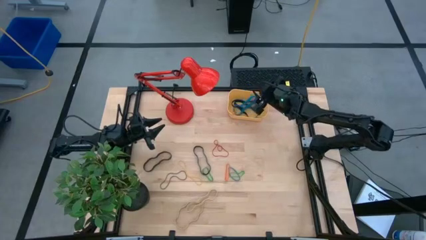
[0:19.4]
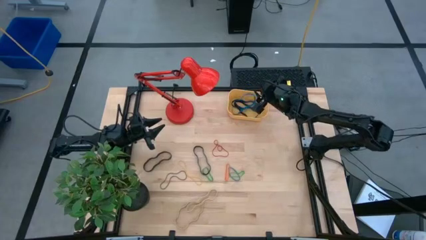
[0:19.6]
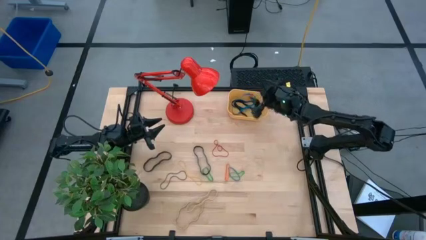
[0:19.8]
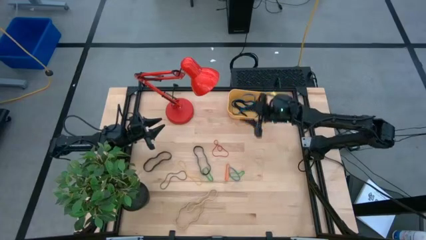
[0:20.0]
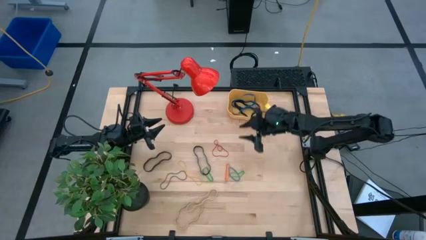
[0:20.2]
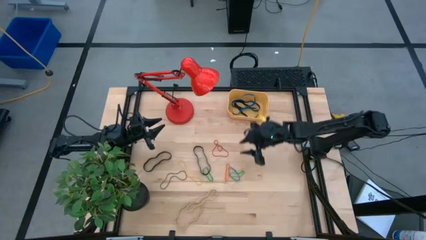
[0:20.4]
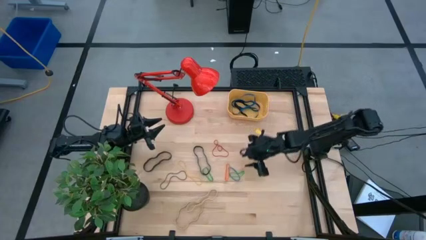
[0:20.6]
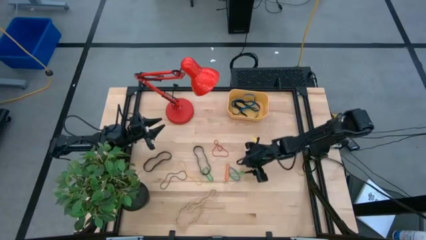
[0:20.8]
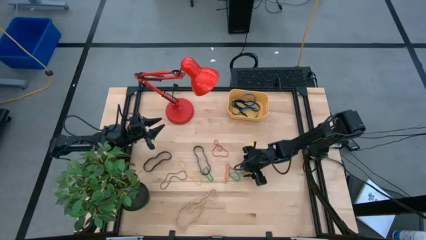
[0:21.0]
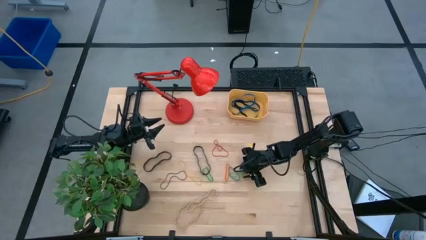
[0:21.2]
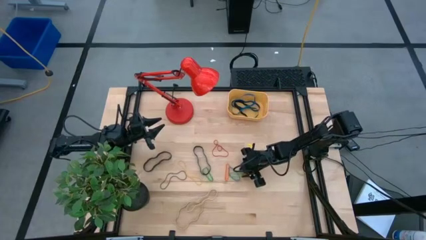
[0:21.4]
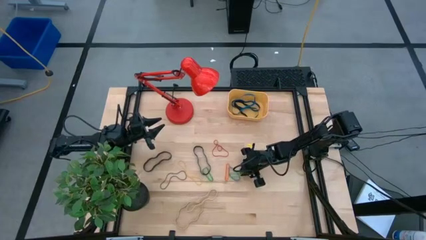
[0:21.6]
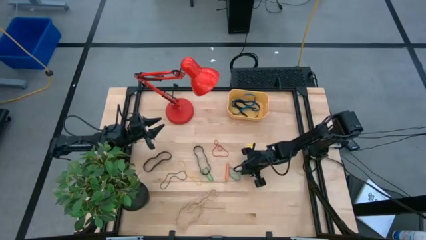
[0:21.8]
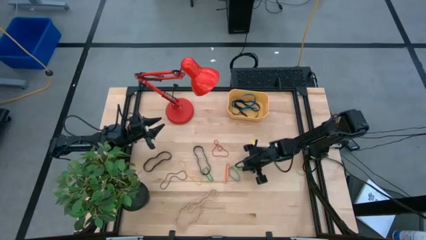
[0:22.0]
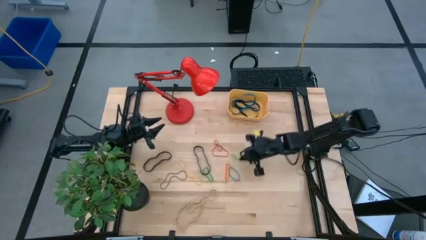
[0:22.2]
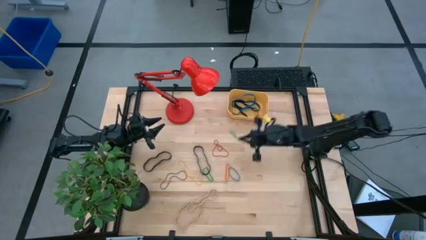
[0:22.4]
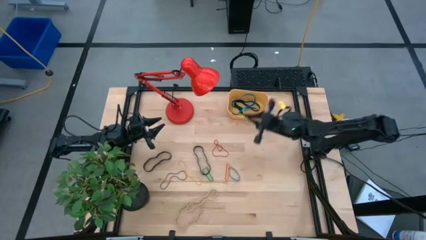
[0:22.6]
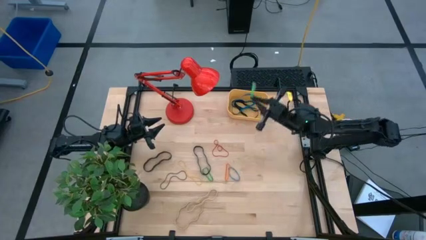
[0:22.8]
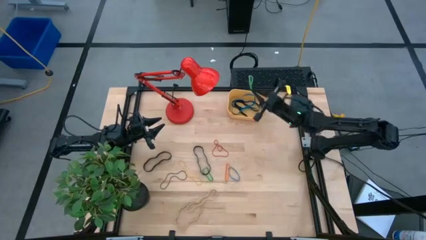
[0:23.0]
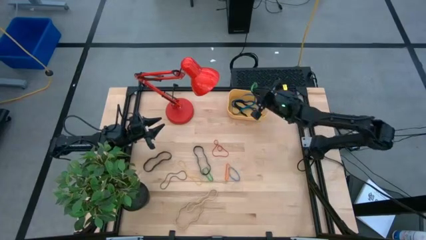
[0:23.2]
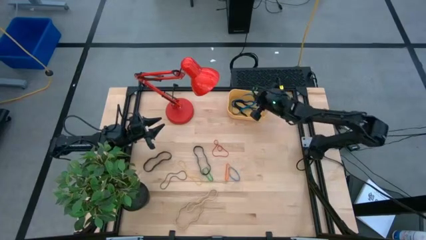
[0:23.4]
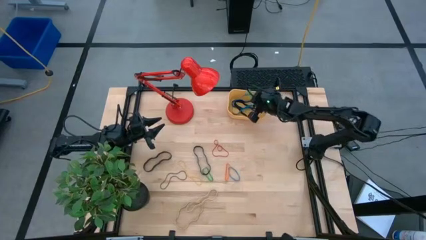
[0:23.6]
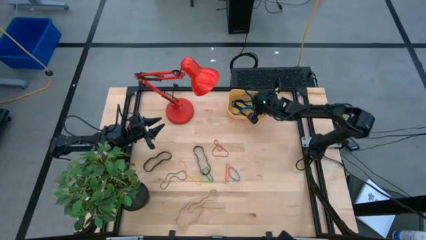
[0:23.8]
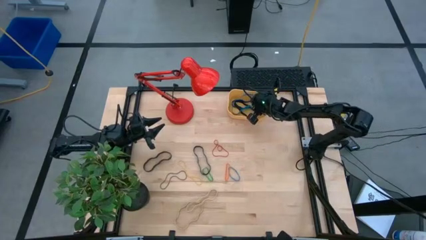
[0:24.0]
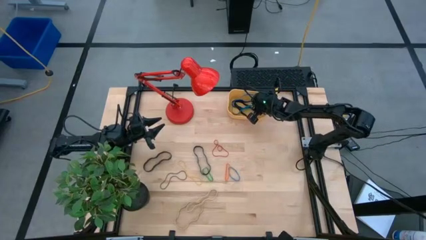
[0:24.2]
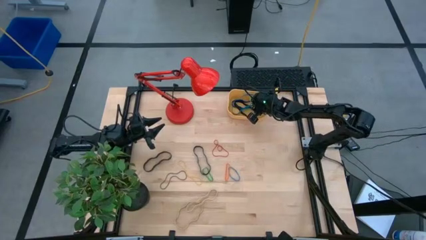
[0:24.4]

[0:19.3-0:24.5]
Task: Pick and place rubber bands into bin
Put the right green rubber band into the yellow container

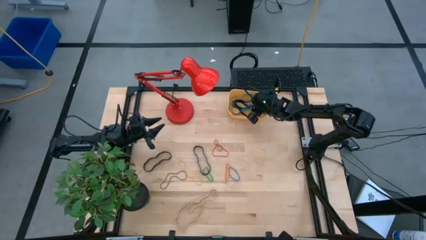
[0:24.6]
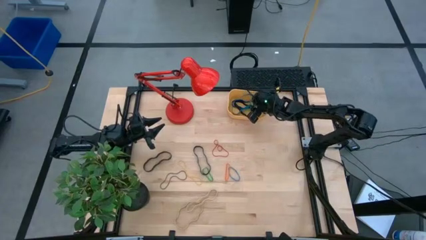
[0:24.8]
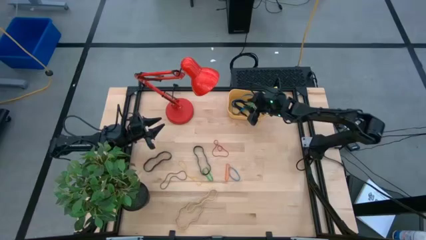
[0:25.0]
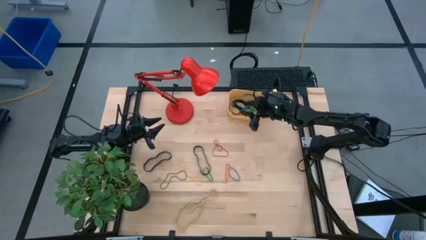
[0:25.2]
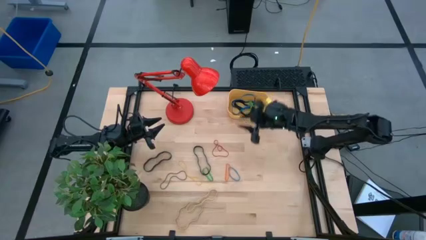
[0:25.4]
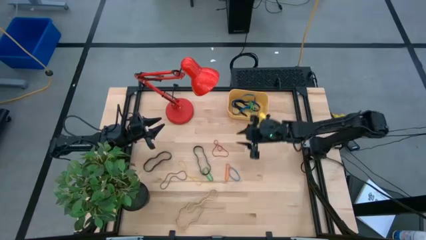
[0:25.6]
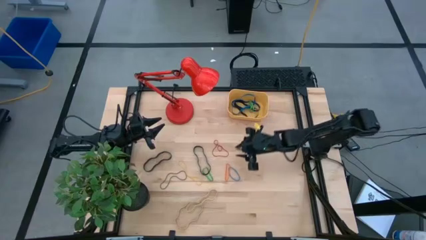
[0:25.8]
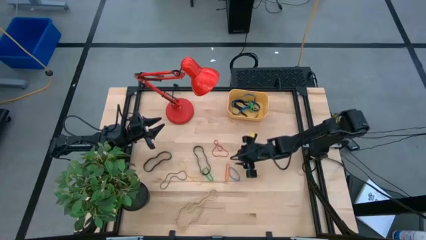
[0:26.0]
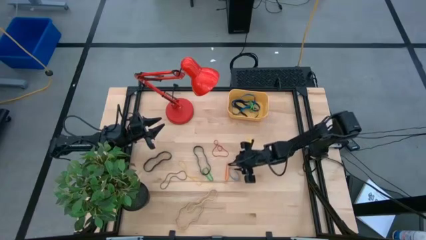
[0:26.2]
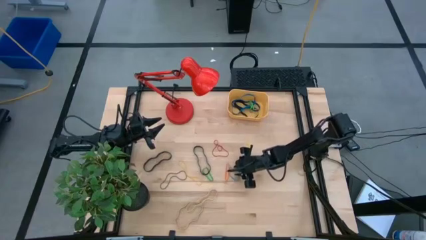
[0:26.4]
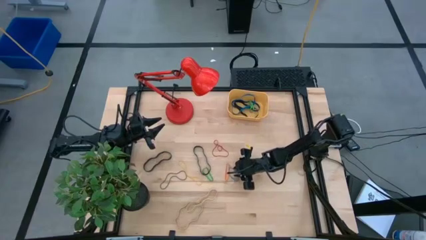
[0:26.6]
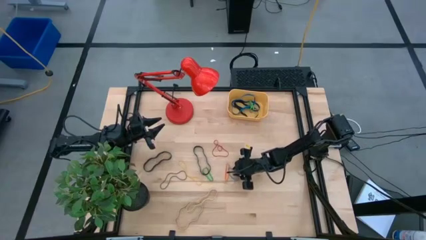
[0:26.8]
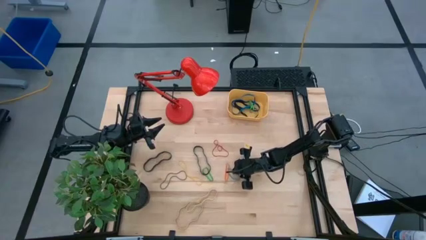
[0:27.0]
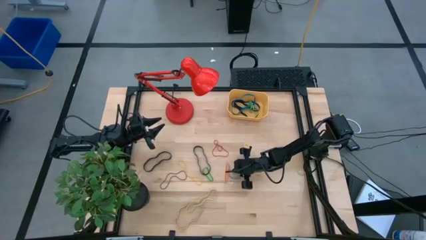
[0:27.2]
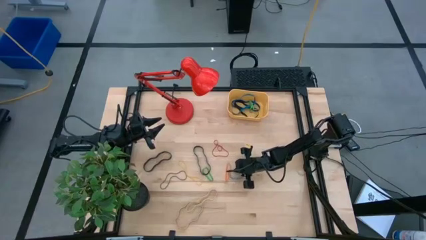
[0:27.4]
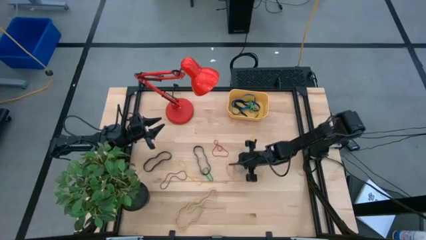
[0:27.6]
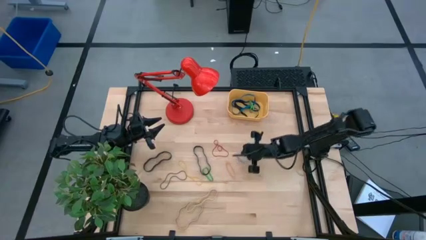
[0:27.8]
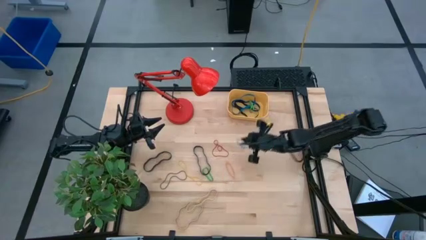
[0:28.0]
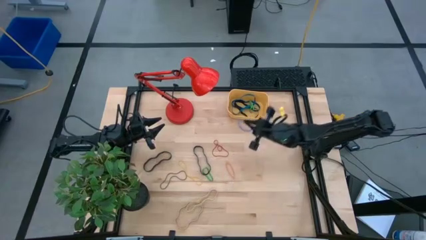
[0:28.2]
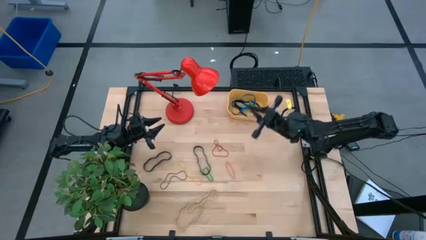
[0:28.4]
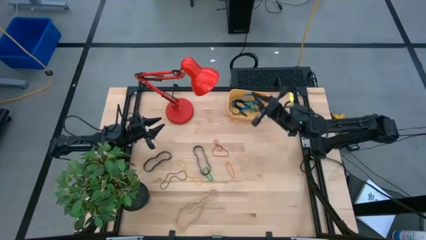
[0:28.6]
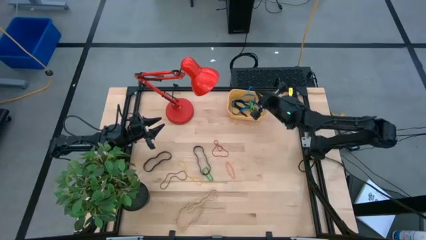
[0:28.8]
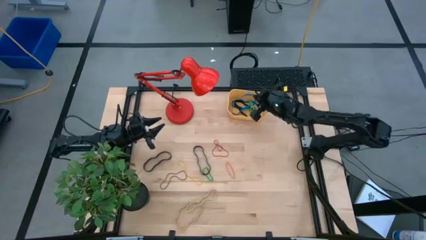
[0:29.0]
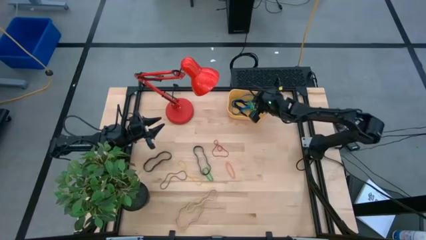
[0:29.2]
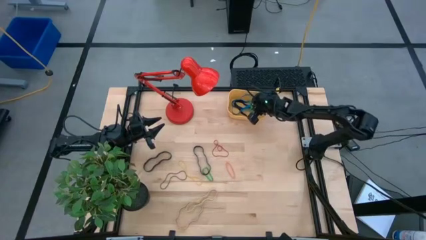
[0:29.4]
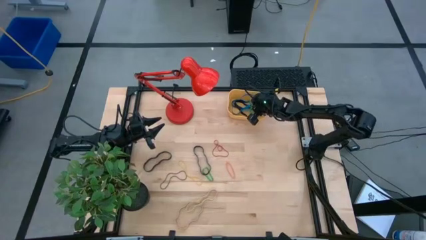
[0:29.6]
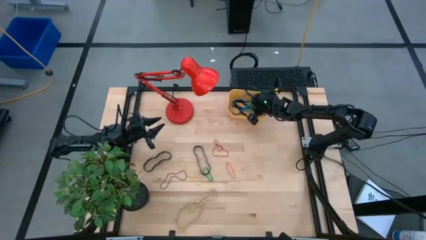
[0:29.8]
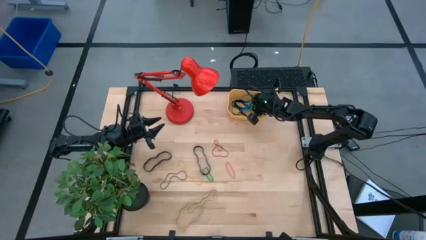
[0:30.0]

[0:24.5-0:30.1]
Put the blue rubber band into the yellow container

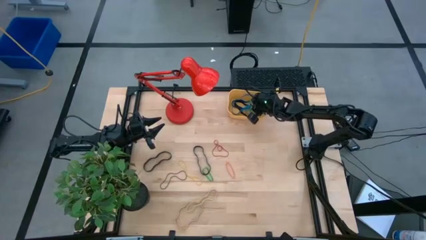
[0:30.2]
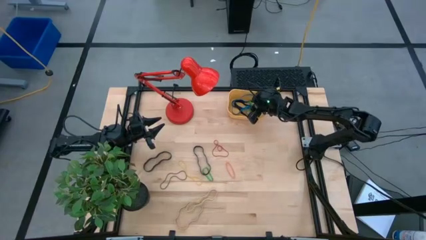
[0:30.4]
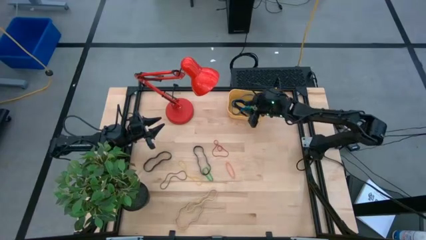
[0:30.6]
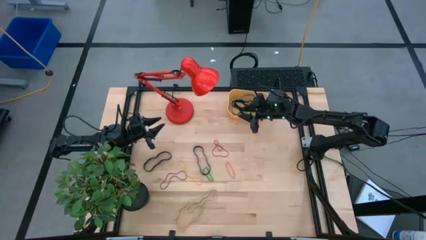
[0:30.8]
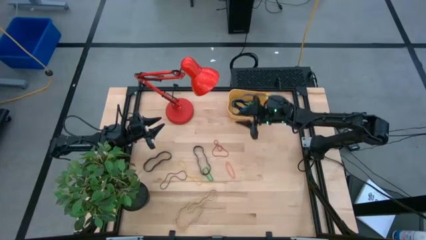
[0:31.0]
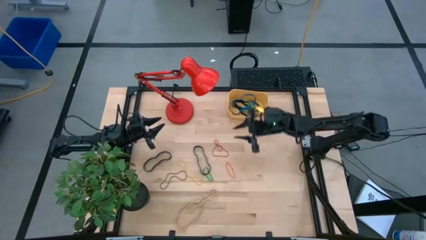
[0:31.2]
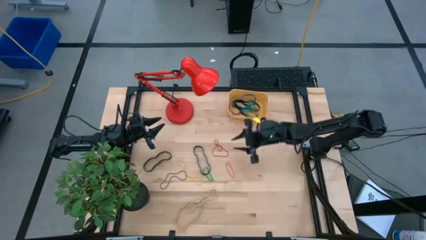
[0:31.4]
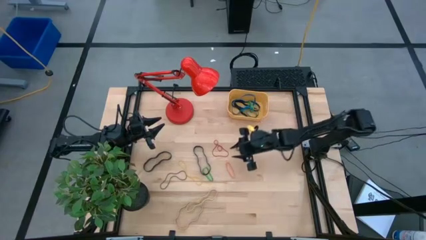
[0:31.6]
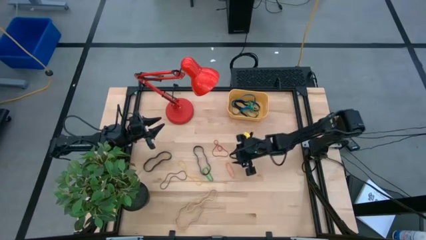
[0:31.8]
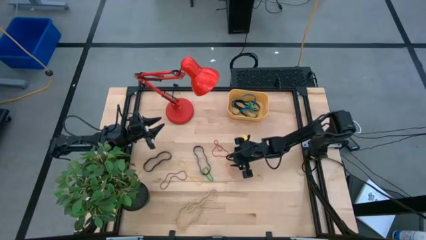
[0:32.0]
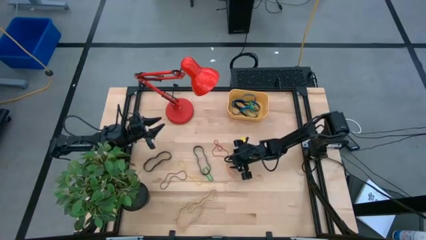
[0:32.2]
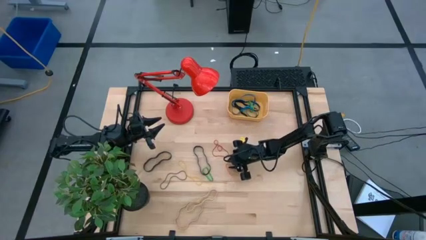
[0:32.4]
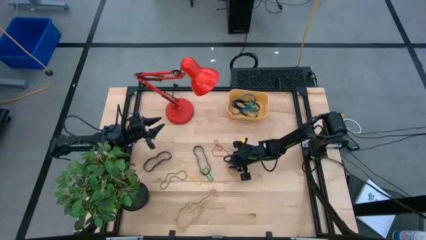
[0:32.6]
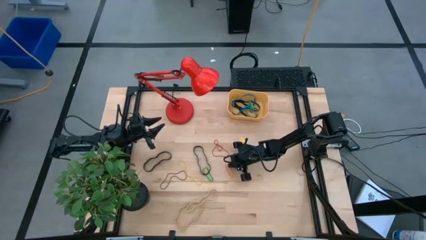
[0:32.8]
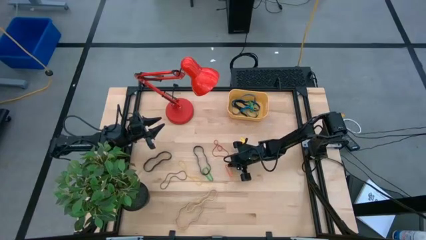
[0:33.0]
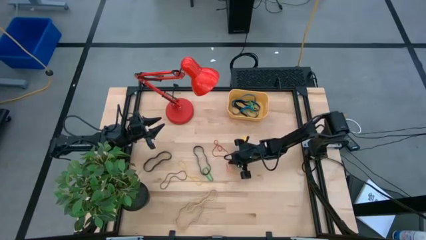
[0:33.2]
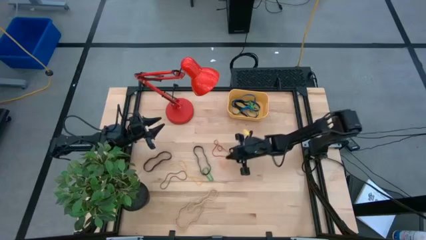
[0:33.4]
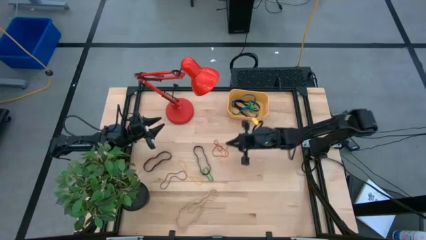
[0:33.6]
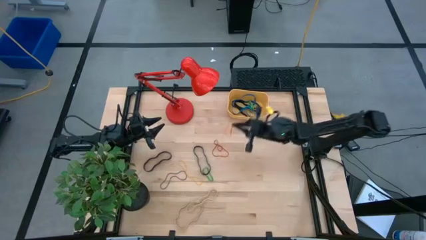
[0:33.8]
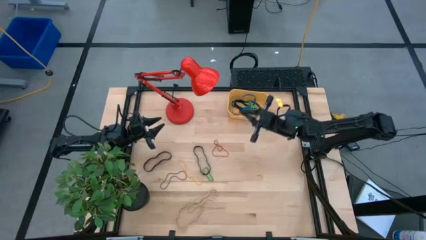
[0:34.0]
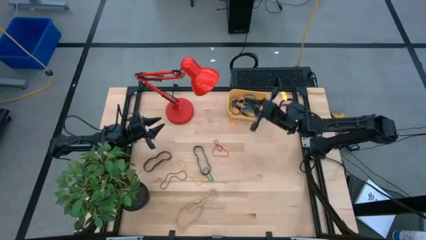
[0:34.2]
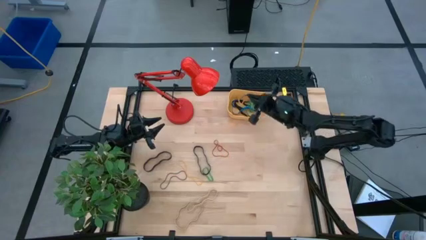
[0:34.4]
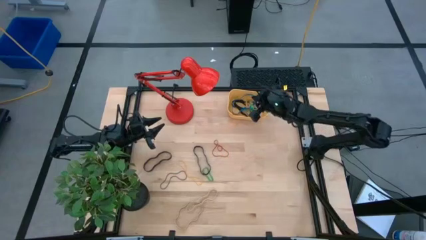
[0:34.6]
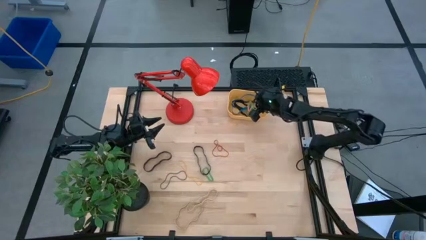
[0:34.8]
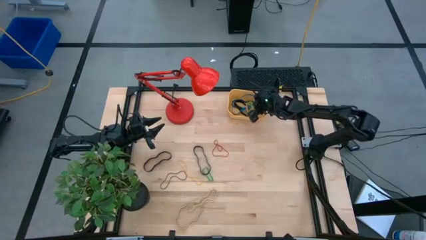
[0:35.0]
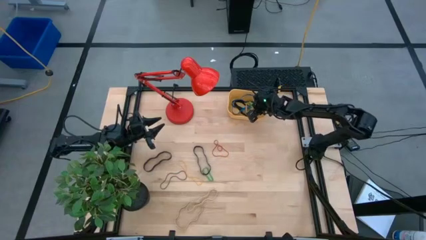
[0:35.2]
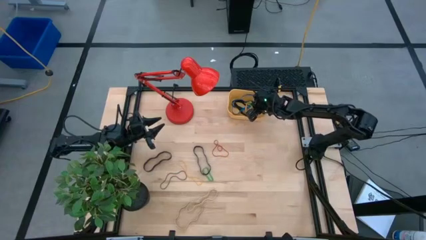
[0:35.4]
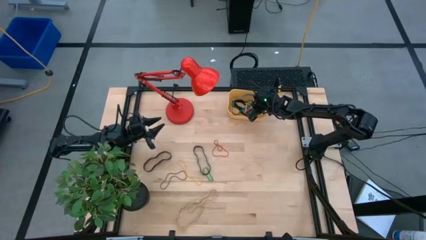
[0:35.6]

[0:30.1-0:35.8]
Put the orange rubber band into the yellow container

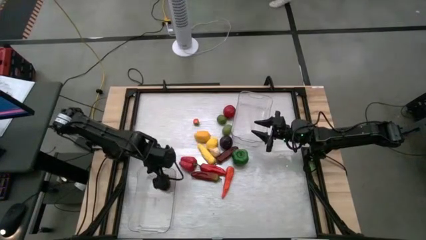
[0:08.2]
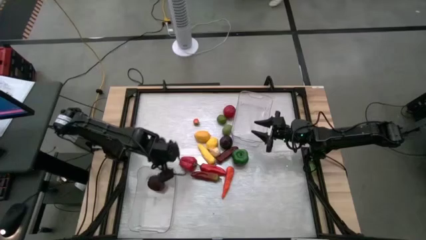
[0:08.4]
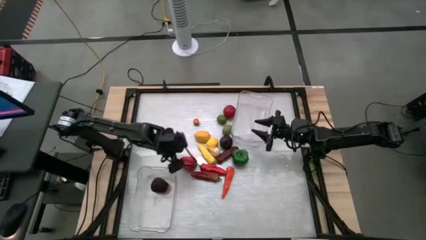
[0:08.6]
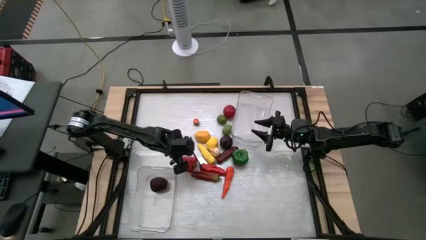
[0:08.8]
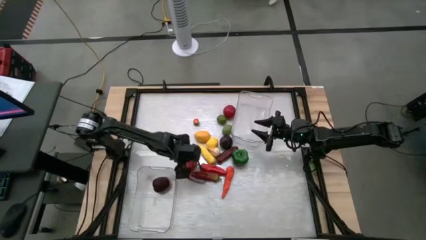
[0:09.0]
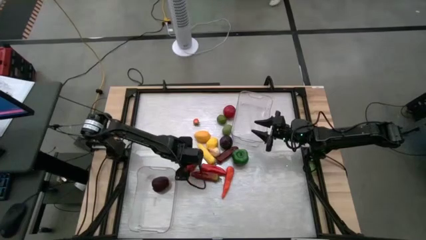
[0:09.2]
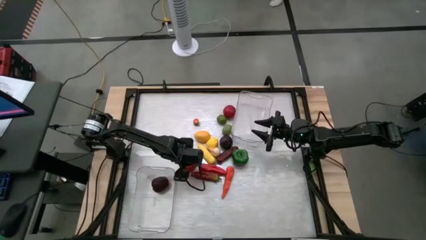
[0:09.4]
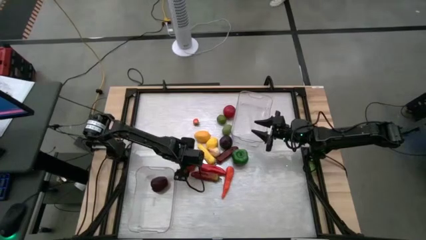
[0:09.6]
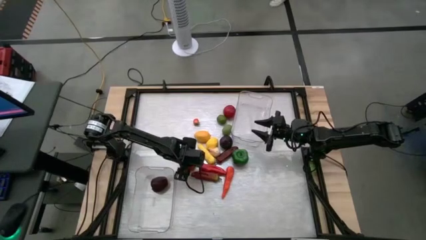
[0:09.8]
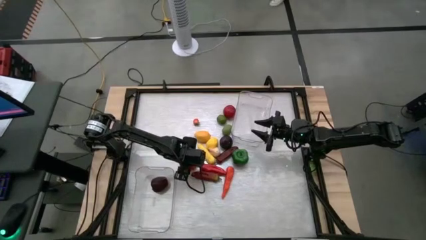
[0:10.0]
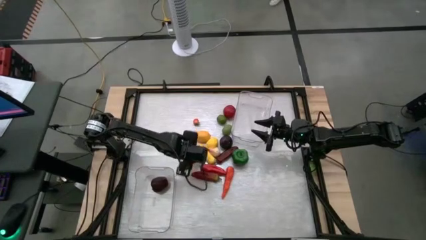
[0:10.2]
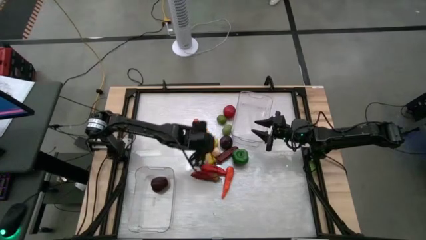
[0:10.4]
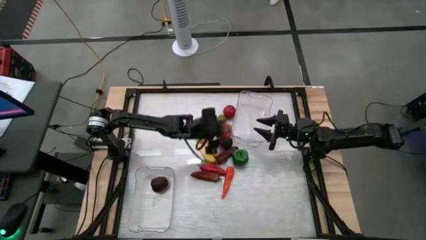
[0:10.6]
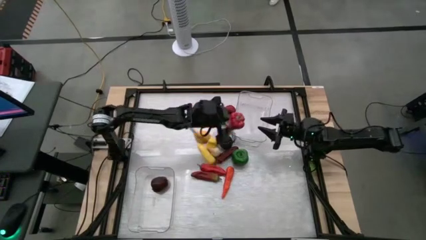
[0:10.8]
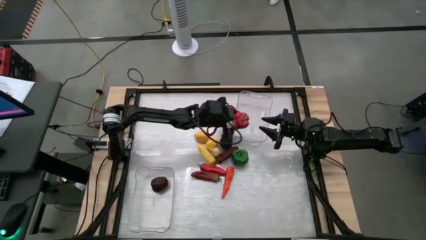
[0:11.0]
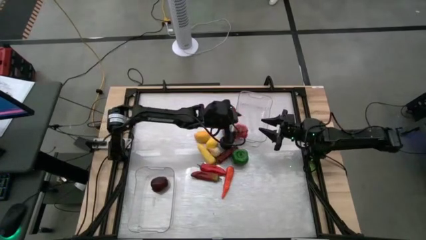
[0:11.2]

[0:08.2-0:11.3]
Task: Sort produce into baskets
Put the red bell pepper into the top transparent bin
